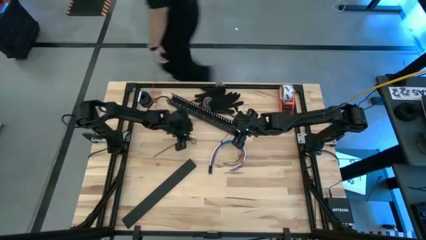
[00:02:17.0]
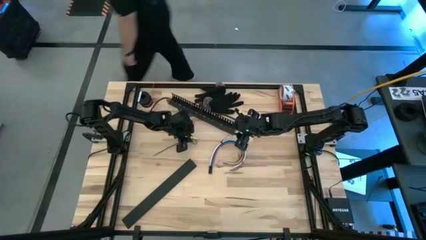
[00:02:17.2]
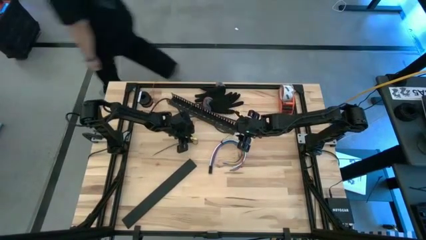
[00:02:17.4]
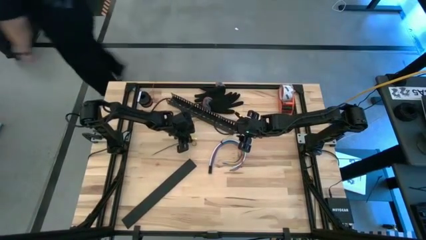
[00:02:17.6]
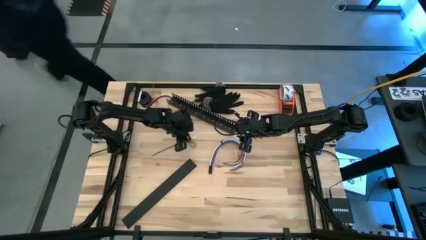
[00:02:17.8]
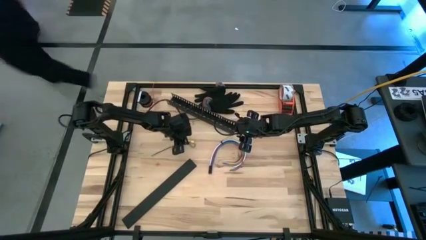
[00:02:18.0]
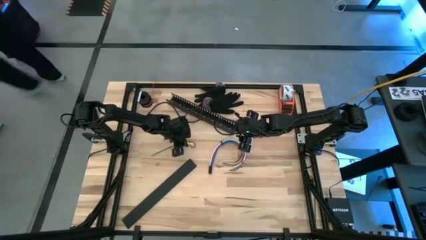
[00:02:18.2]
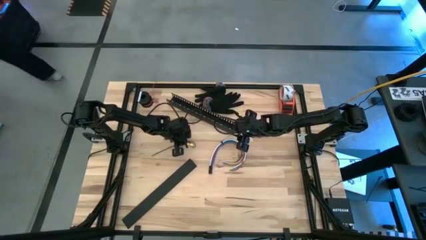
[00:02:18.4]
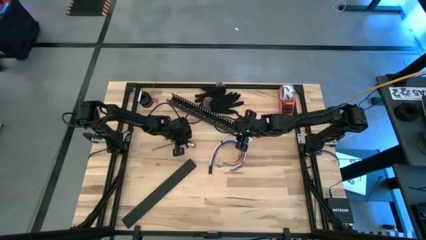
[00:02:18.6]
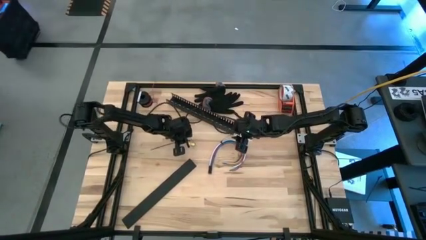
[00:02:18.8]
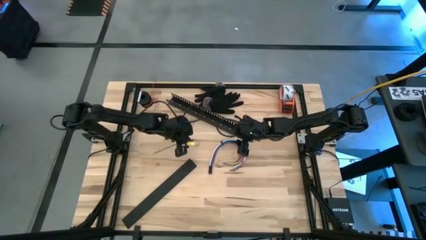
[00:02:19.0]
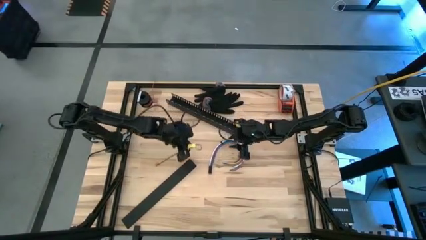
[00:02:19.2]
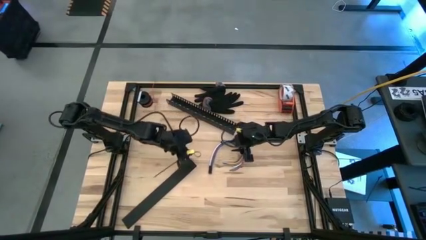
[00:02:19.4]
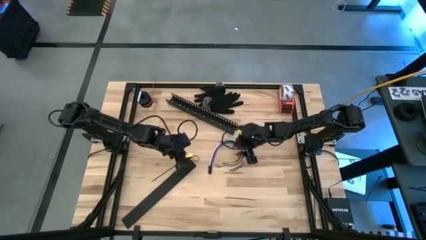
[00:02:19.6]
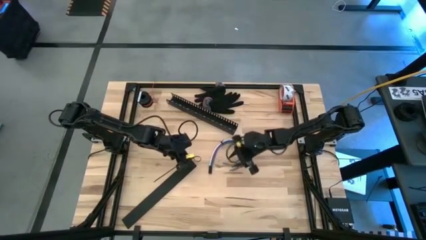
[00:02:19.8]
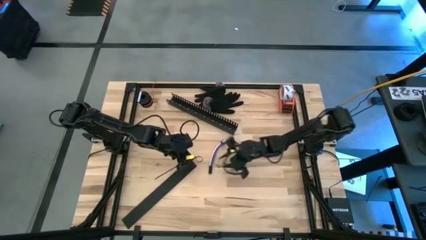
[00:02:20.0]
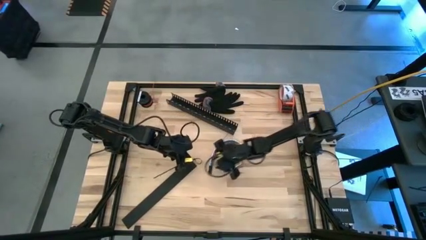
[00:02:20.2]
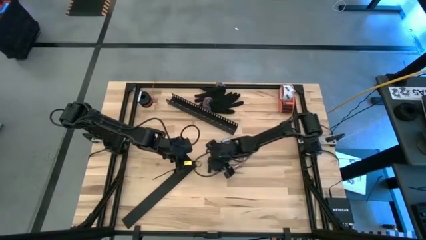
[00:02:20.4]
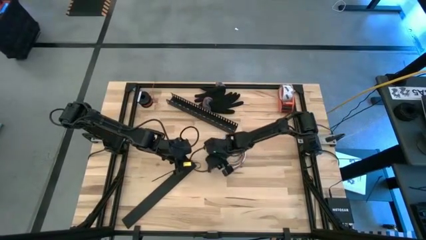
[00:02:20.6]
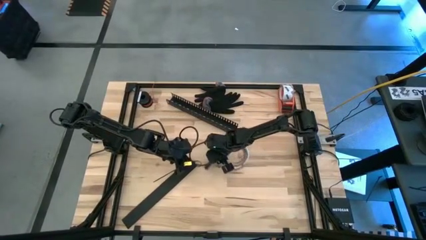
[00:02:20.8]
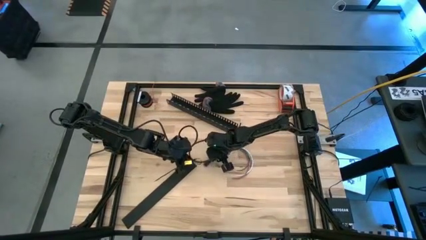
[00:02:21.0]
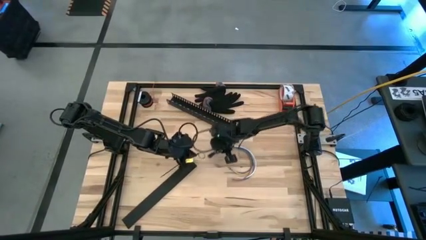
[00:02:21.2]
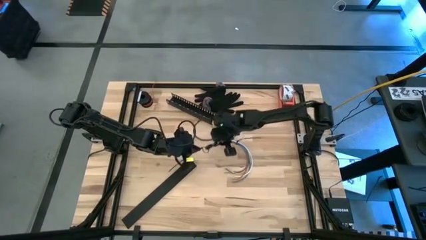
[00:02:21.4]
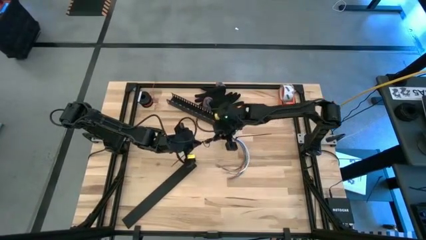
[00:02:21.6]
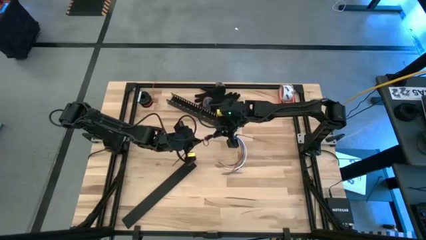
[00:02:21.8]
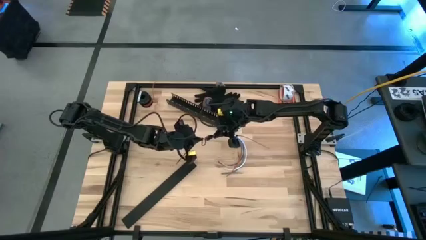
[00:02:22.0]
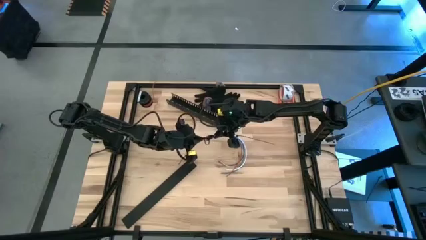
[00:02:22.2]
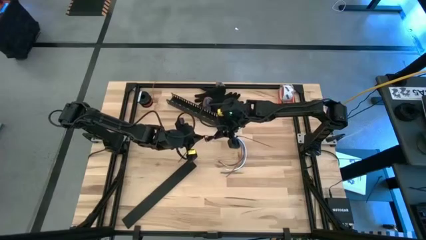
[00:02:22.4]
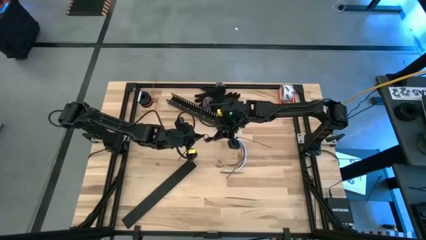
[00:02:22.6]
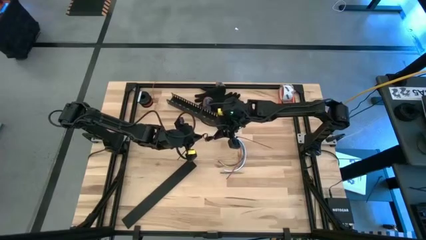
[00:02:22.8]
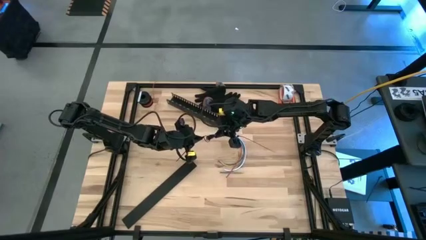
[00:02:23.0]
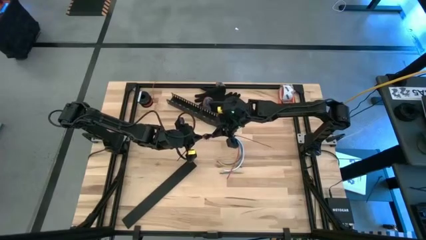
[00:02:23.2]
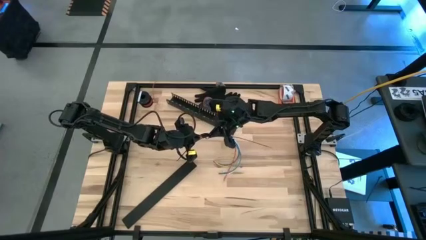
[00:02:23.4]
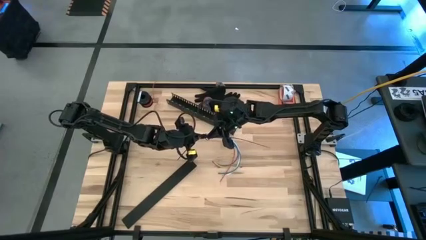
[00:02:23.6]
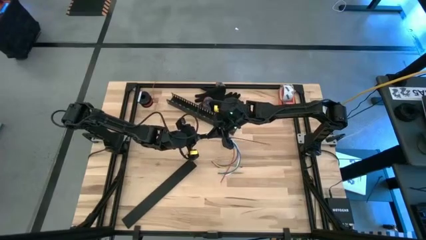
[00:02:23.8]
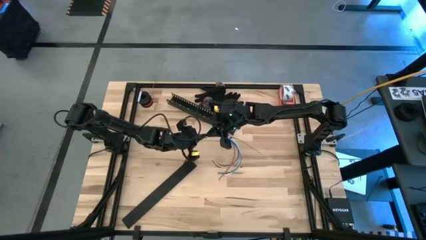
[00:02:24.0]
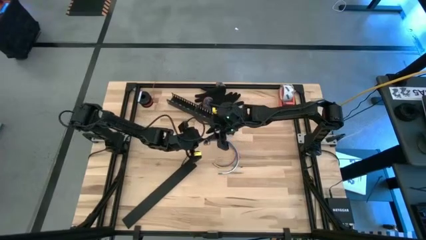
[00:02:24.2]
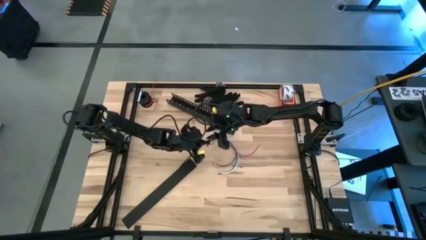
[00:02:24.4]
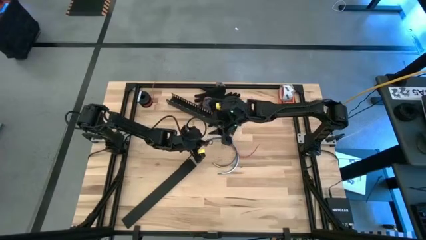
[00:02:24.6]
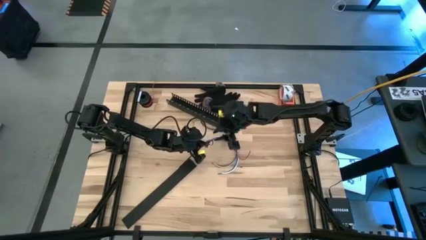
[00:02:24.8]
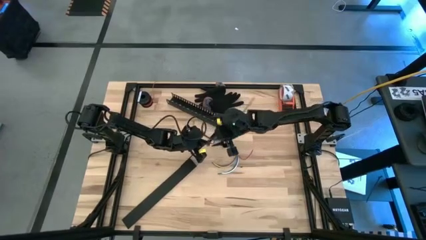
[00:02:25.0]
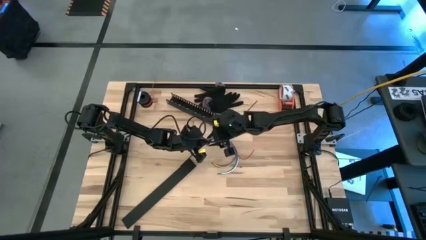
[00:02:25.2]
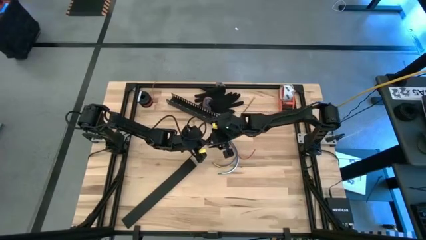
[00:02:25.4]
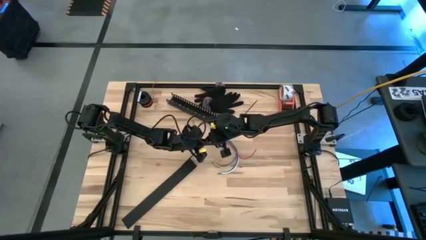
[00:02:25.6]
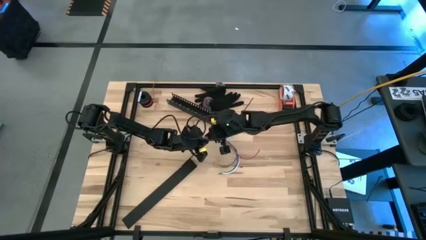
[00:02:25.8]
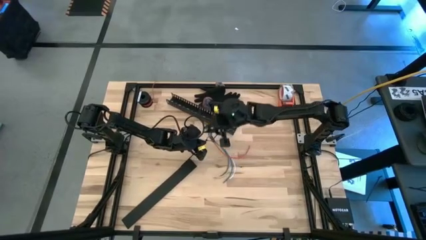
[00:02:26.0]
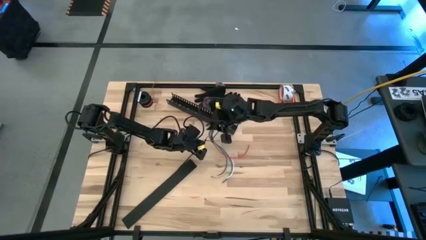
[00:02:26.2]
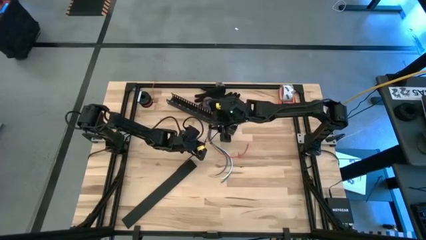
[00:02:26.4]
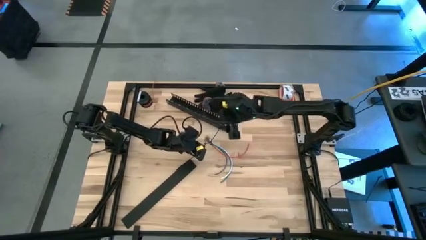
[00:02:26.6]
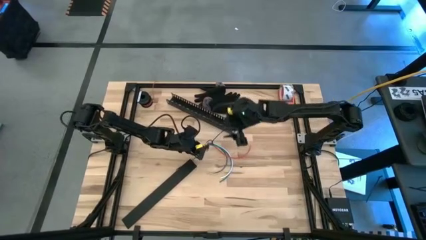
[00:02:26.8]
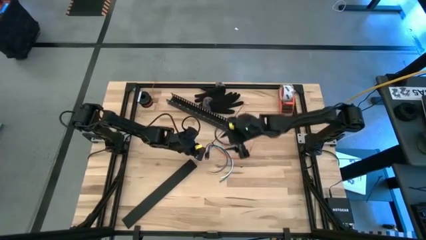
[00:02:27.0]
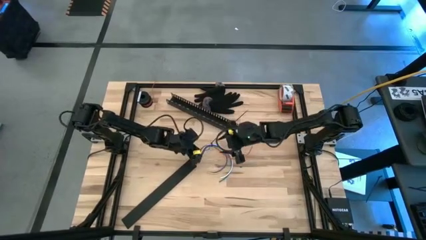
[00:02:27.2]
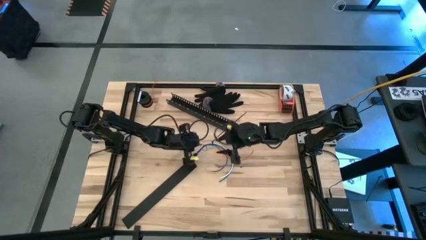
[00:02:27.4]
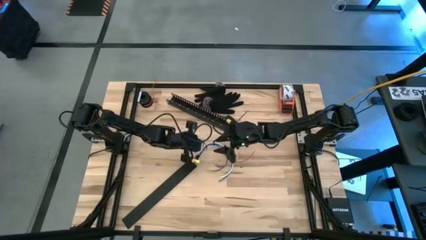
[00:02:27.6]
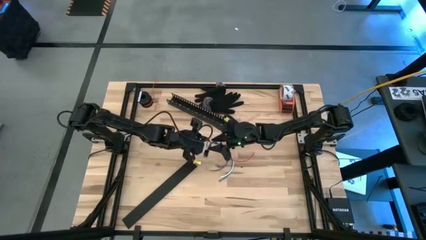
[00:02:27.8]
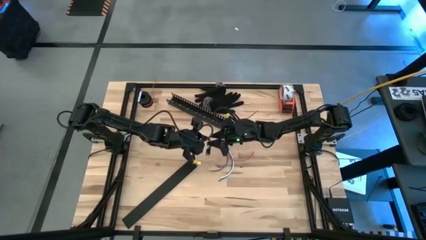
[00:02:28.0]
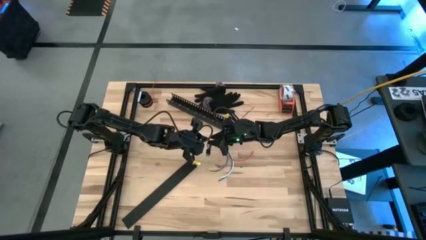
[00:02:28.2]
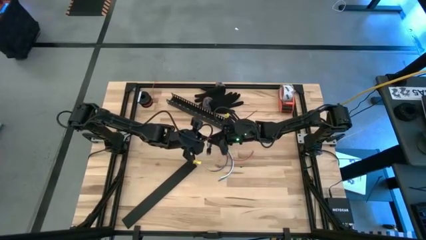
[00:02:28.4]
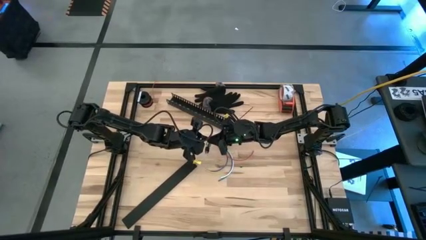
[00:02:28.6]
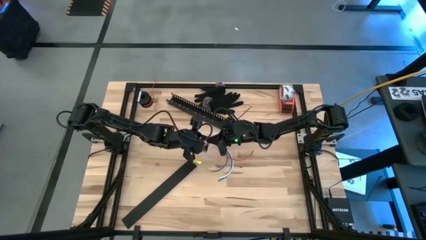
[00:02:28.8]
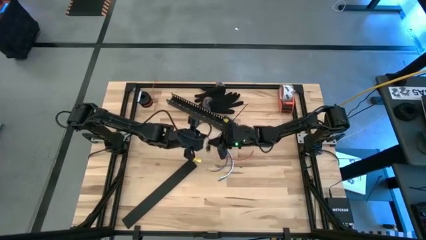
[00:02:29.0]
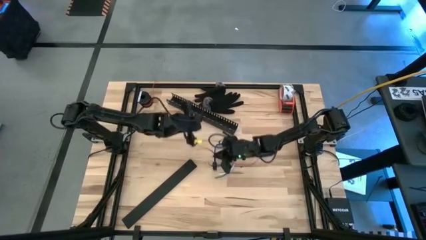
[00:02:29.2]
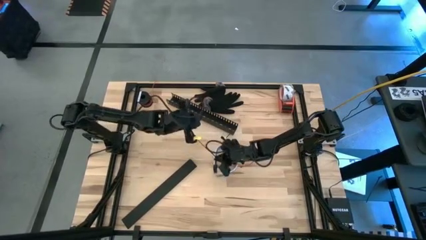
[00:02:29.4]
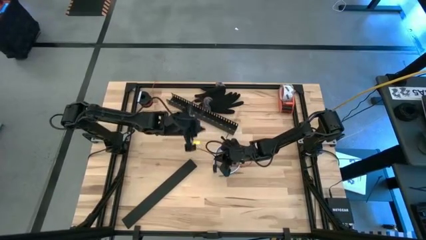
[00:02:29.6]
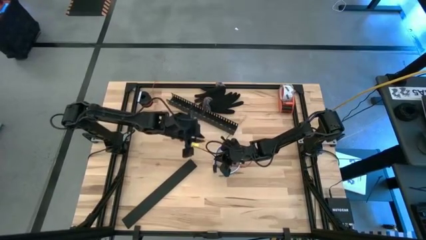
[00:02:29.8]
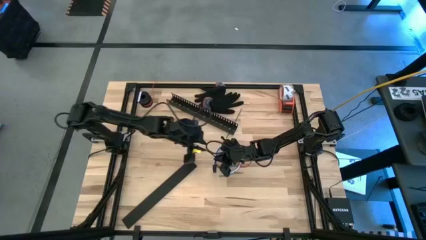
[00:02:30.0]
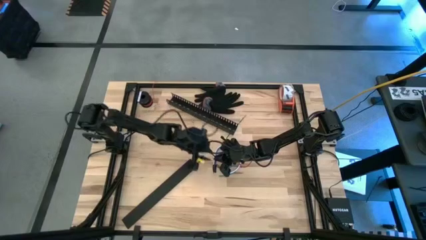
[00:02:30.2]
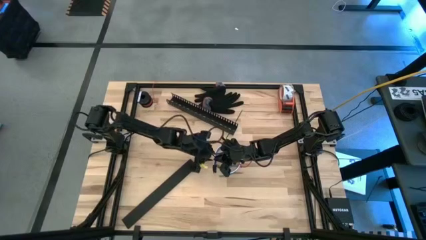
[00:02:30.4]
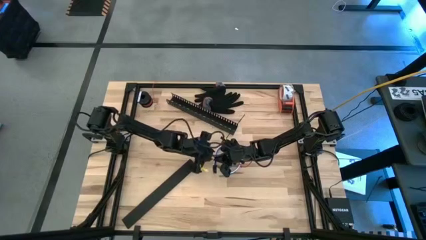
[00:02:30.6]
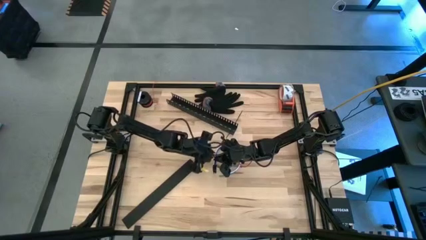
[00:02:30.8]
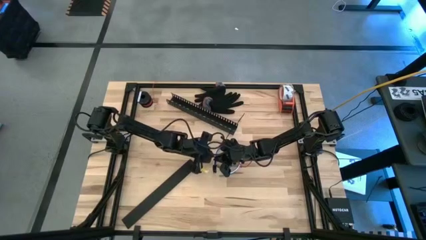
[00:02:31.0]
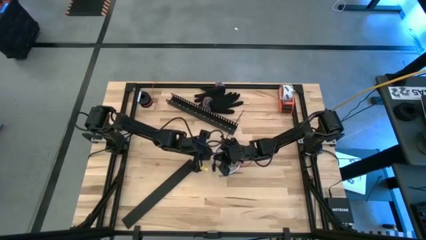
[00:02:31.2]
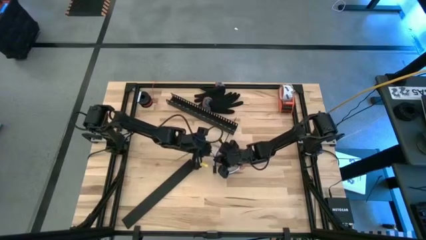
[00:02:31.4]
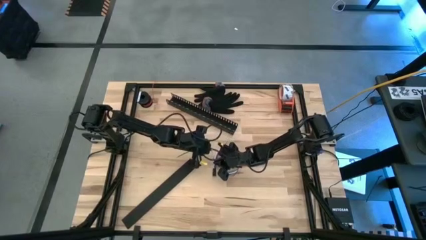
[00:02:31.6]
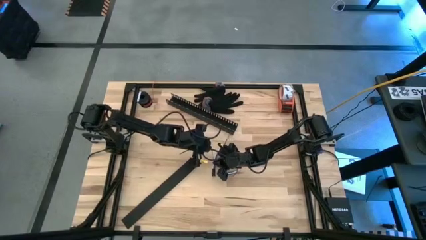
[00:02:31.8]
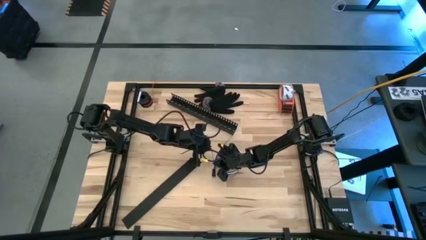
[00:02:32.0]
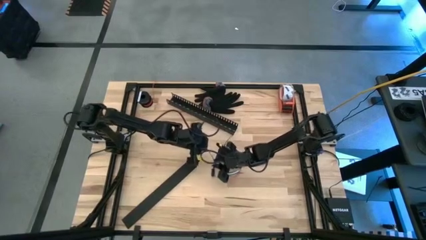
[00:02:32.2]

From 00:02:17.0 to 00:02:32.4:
Task: Ziptie cables
Wrap the cable wires together using the black zip tie
